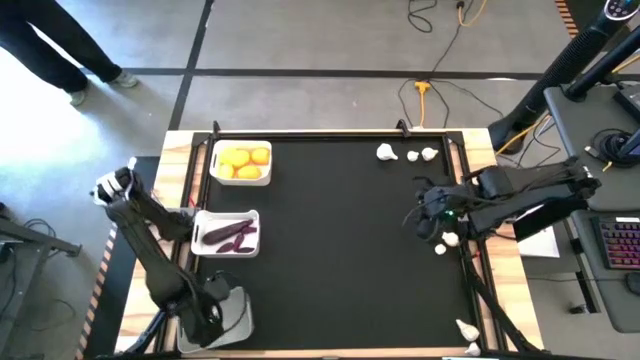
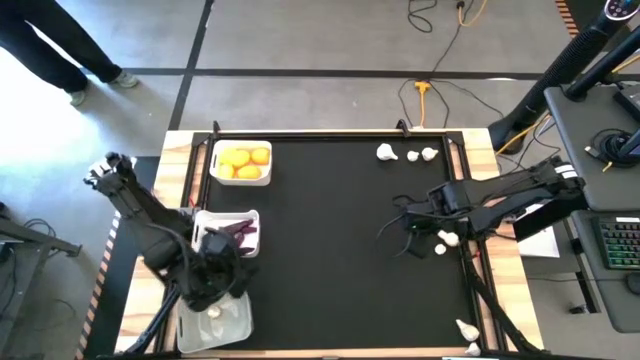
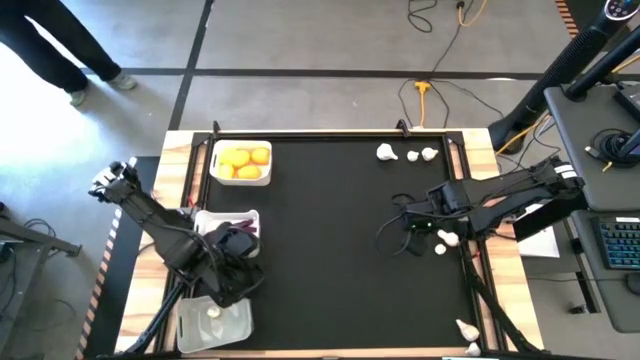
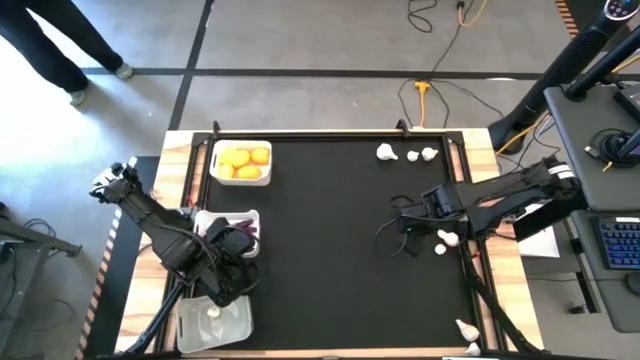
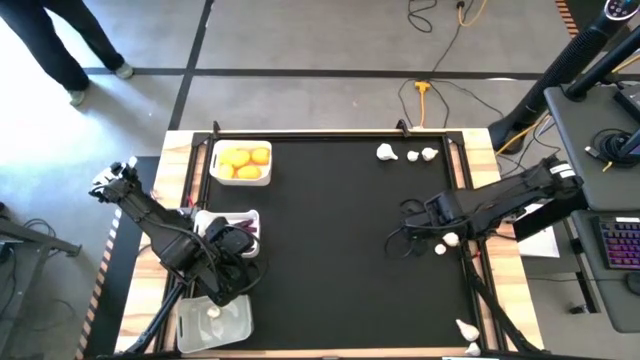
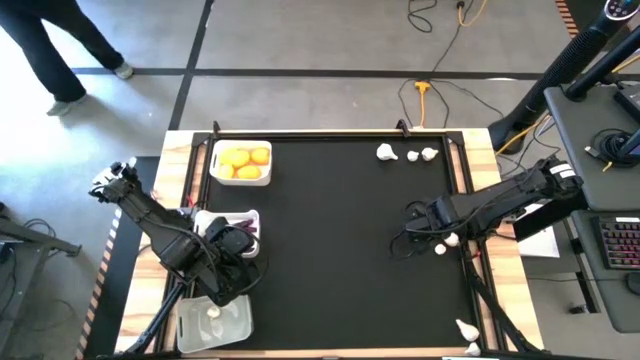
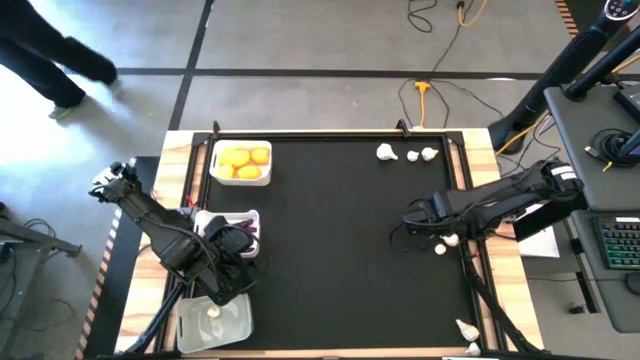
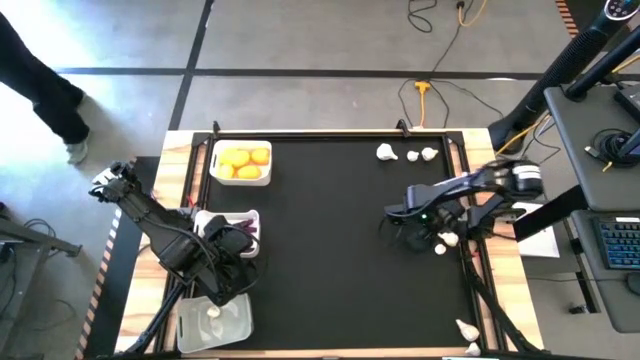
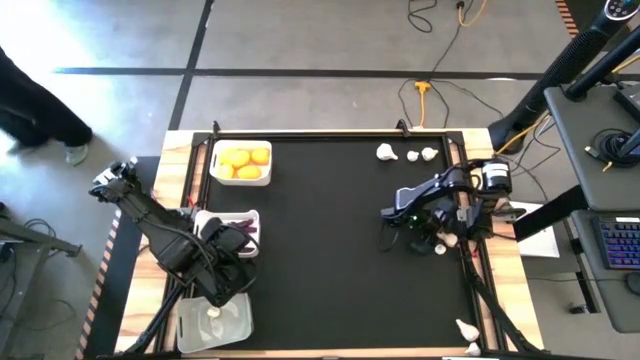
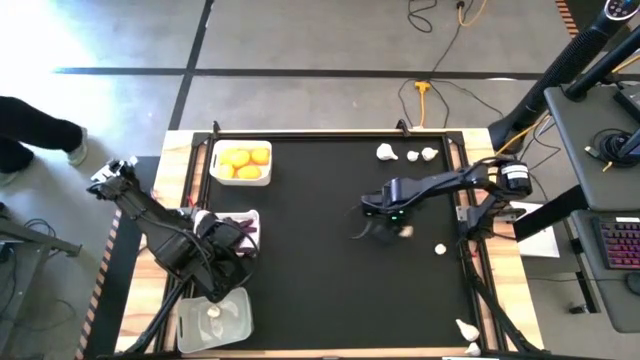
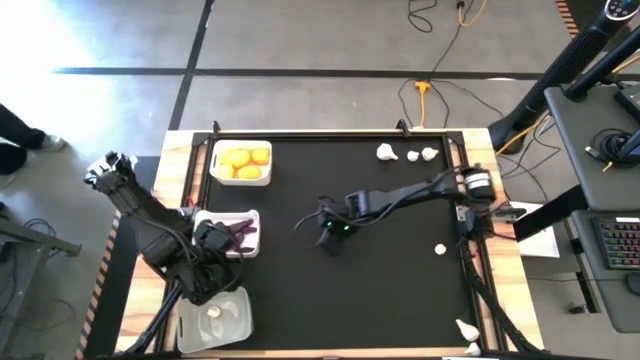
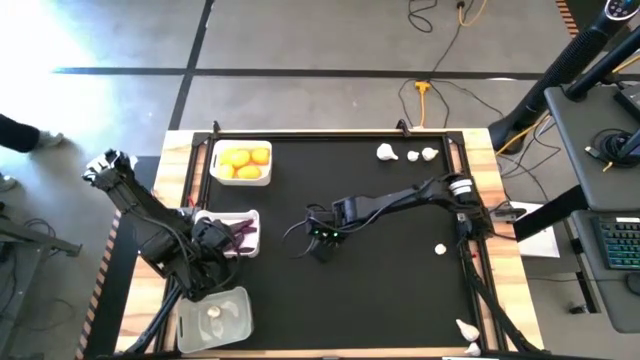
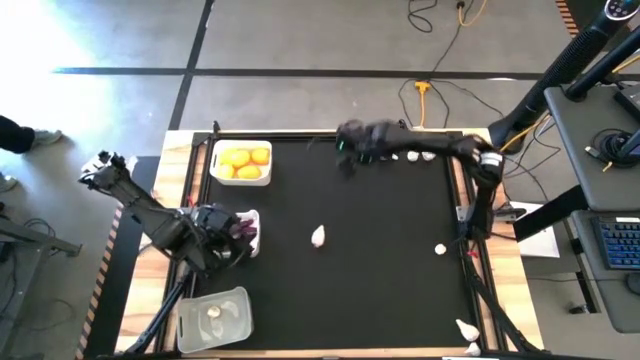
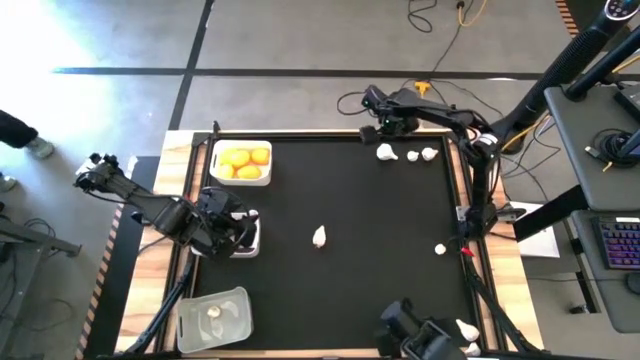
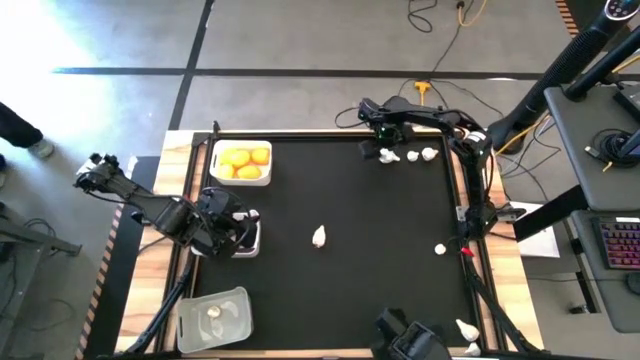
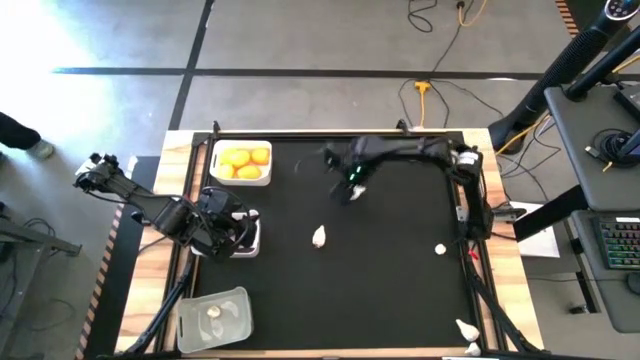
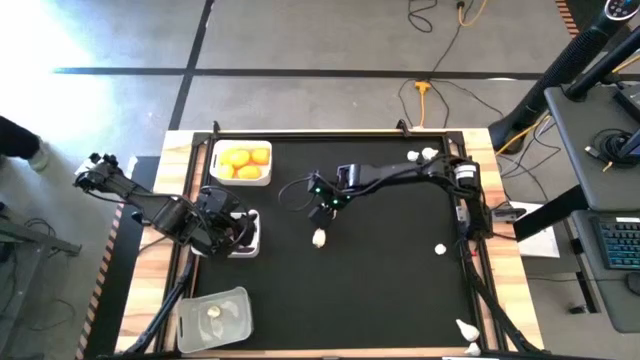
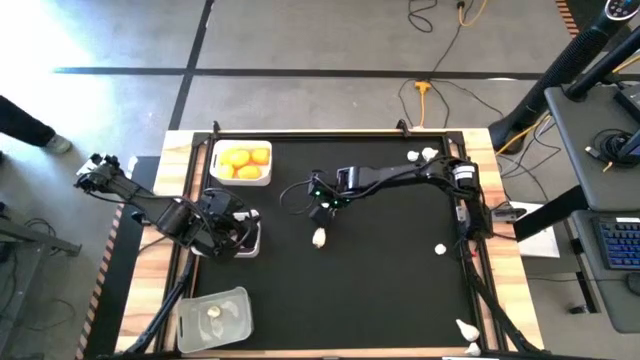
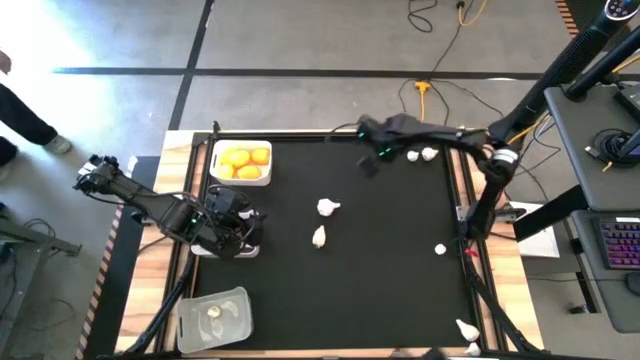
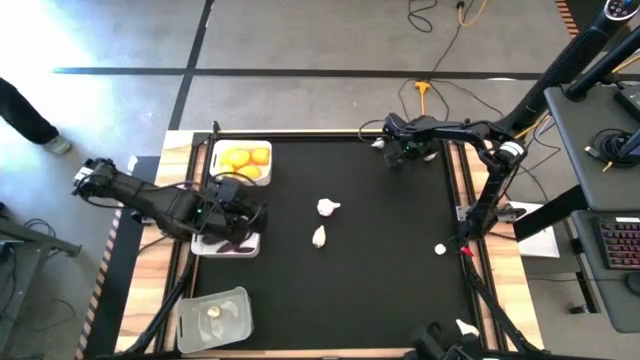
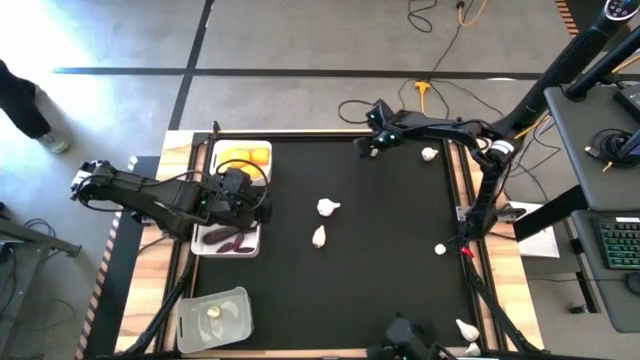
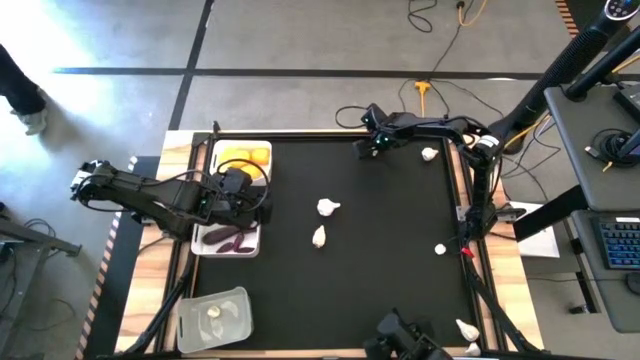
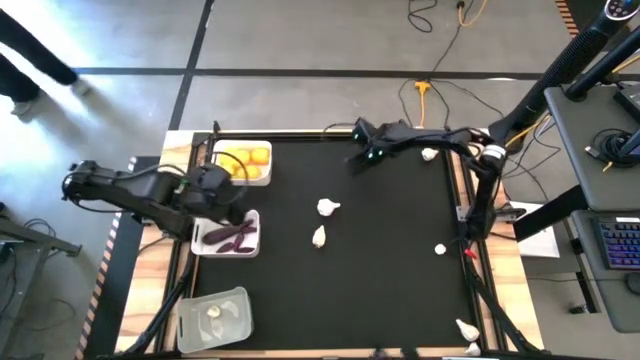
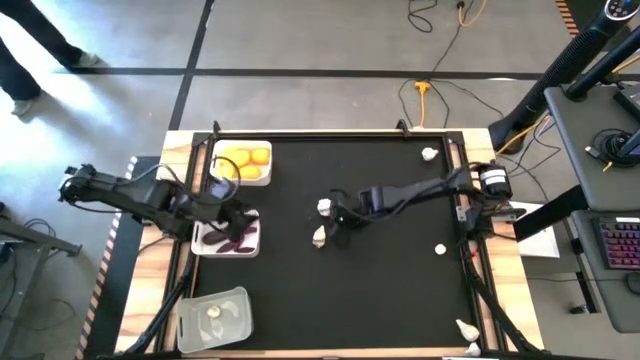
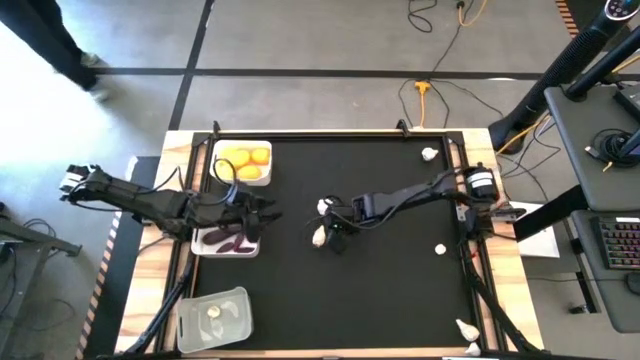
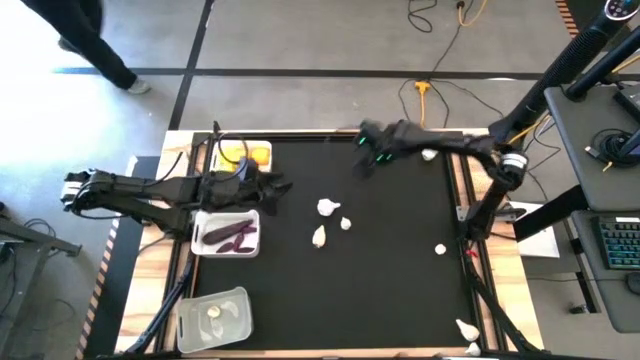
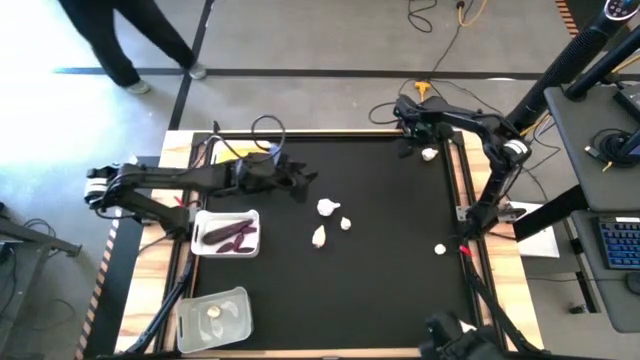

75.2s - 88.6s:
Task: Sort produce into baskets
Move the garlic to the center of the table

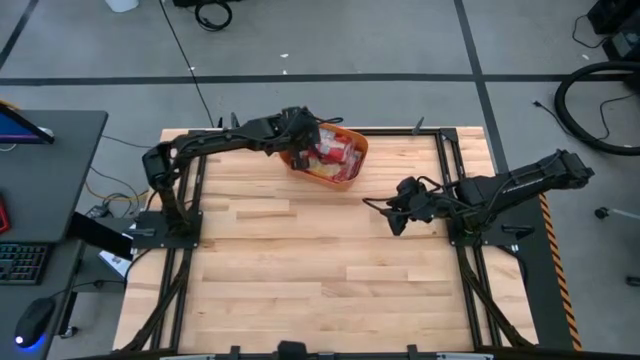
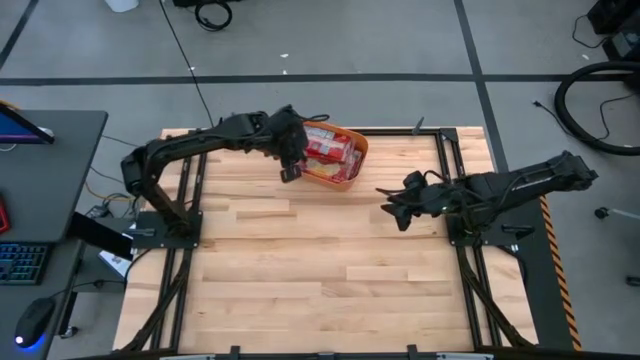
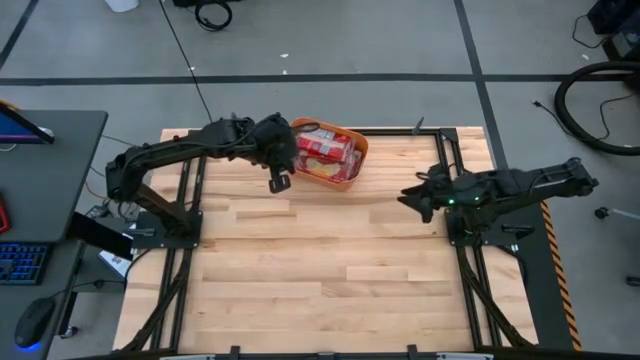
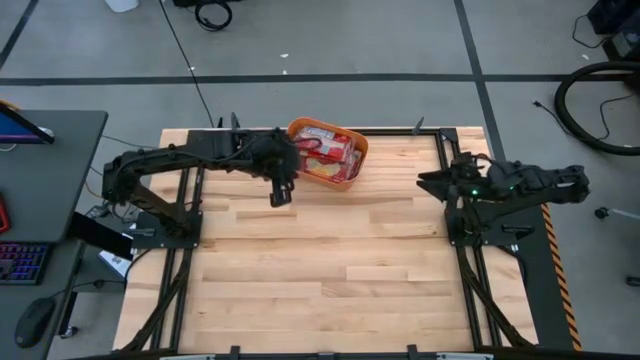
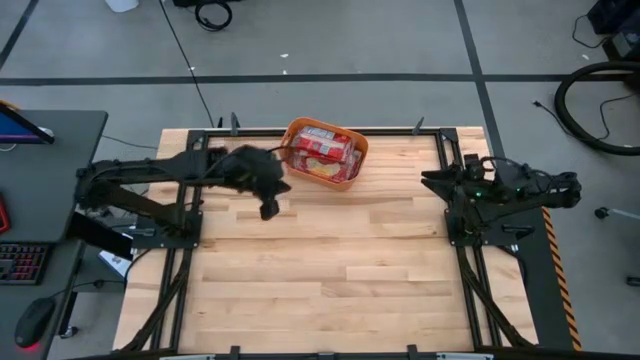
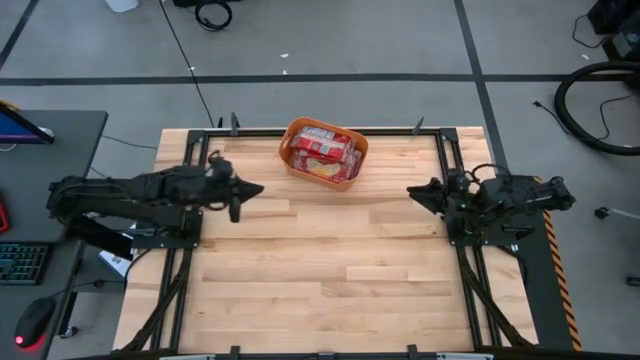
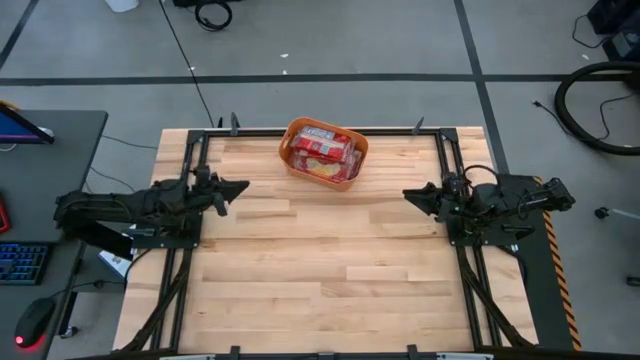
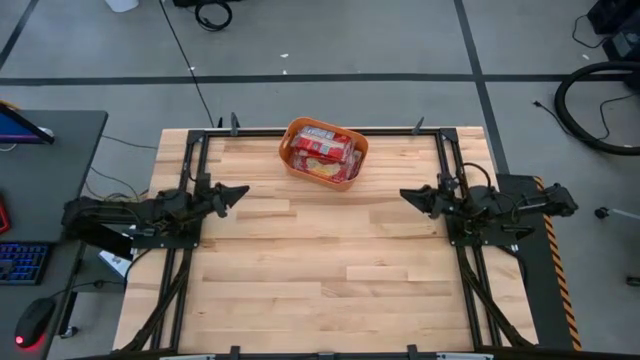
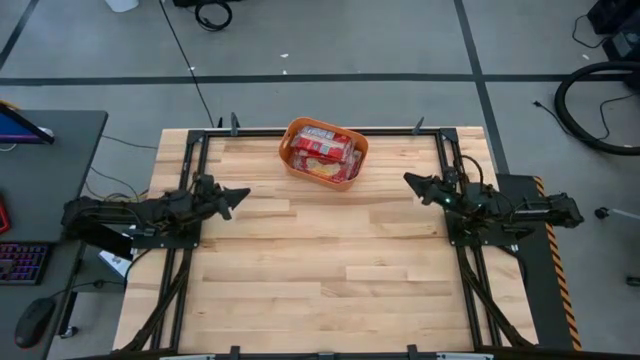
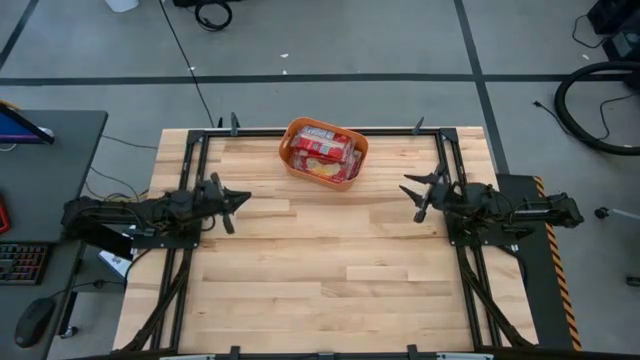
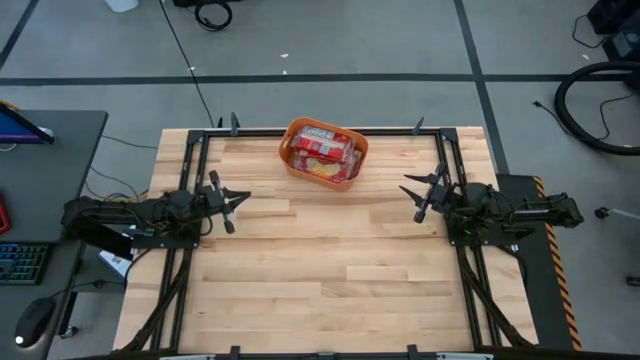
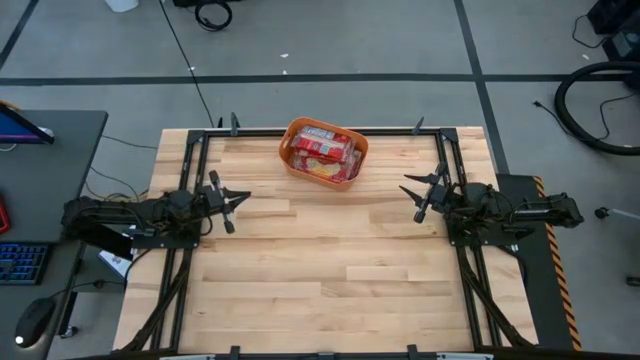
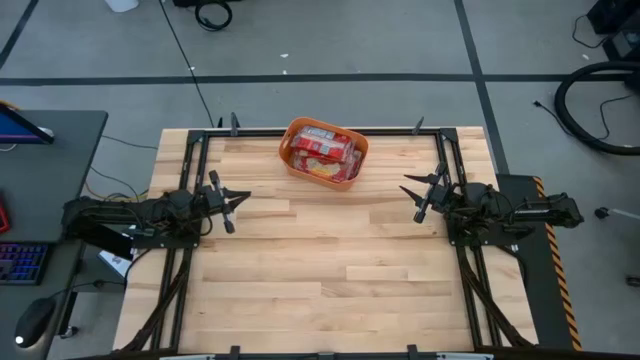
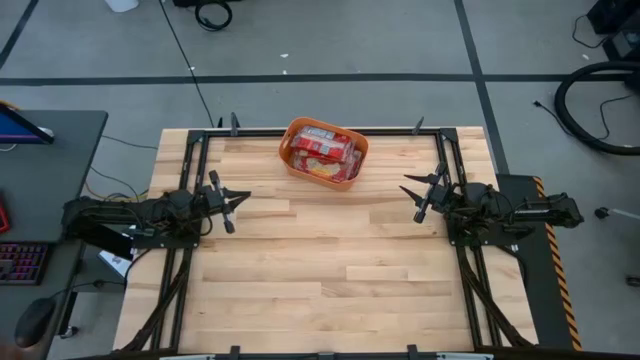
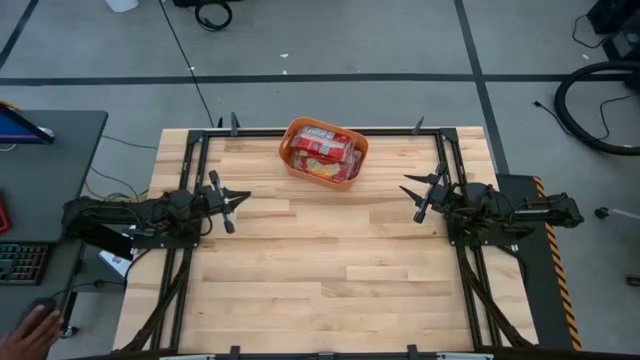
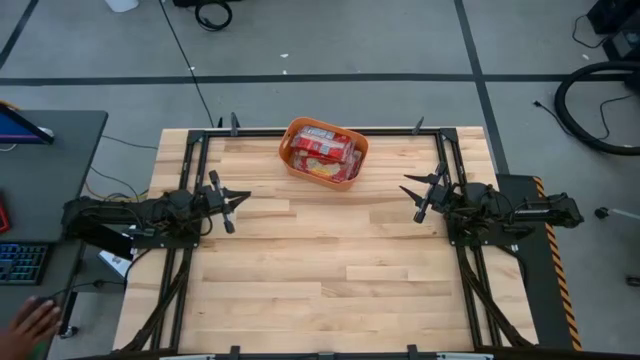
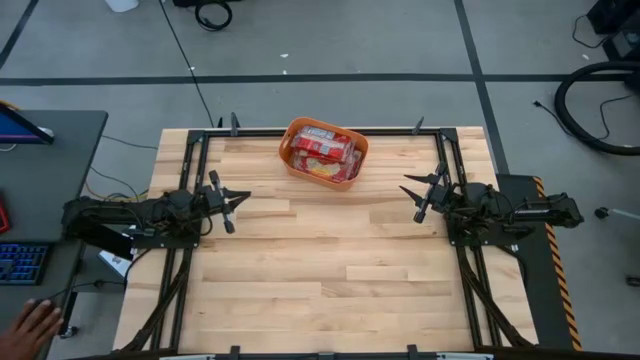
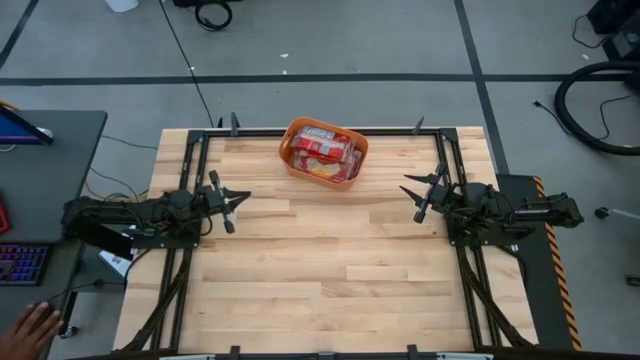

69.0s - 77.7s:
Task: Sort popcorn bags into baskets
Return to Home Position
